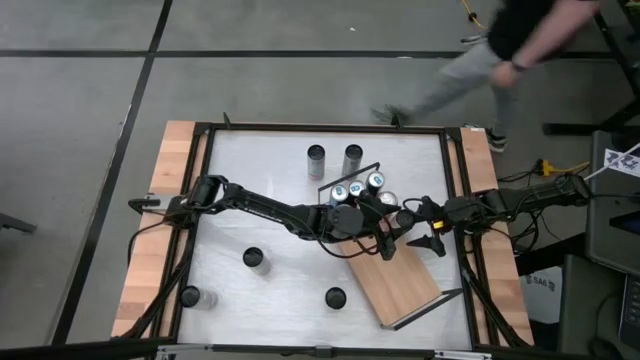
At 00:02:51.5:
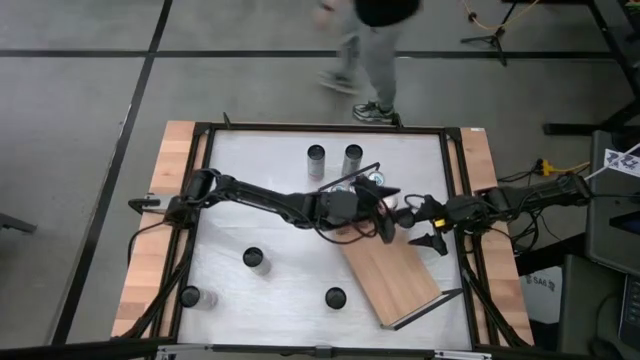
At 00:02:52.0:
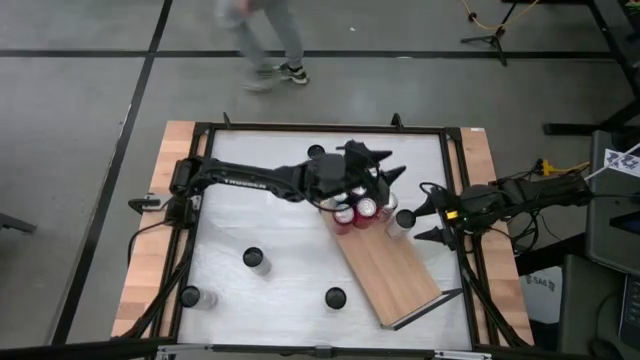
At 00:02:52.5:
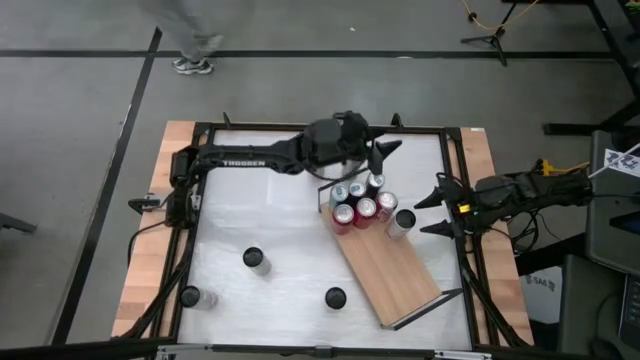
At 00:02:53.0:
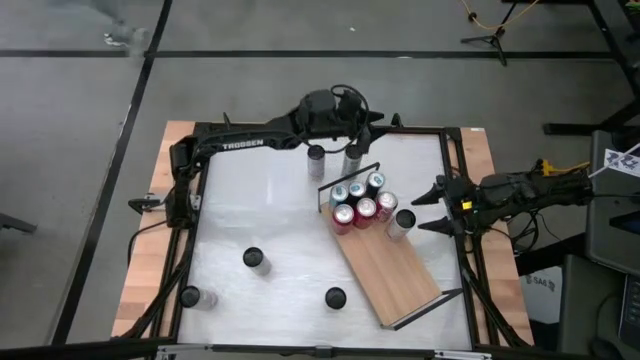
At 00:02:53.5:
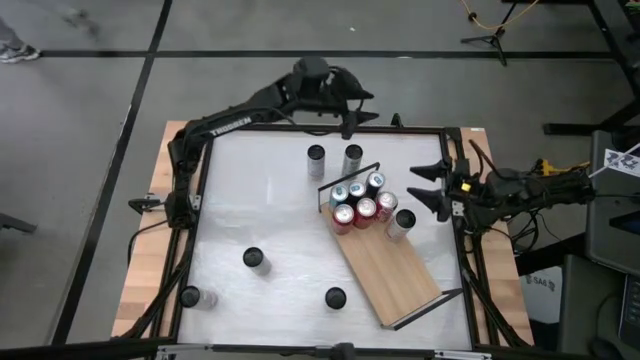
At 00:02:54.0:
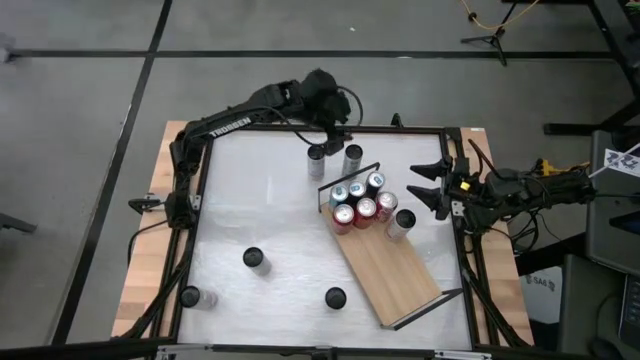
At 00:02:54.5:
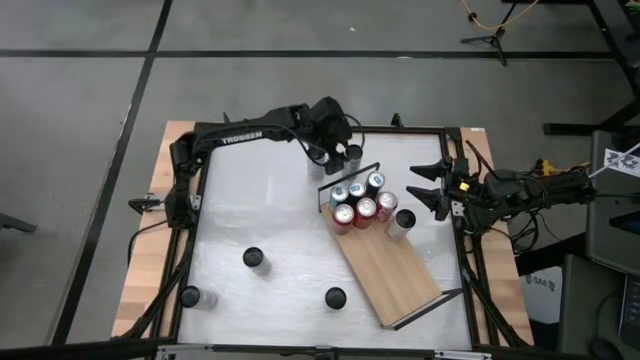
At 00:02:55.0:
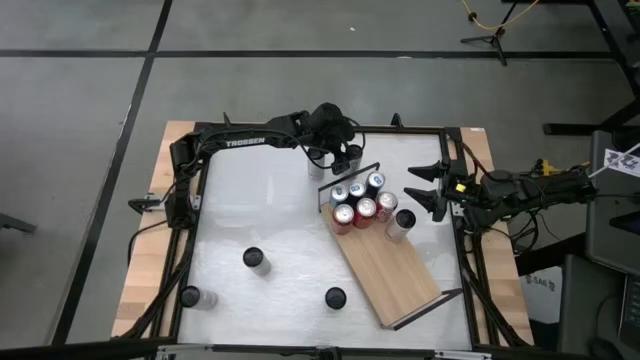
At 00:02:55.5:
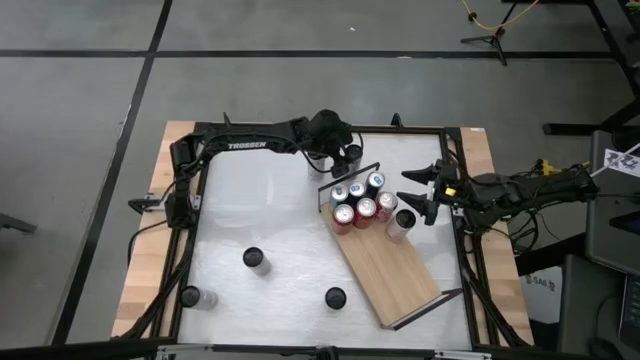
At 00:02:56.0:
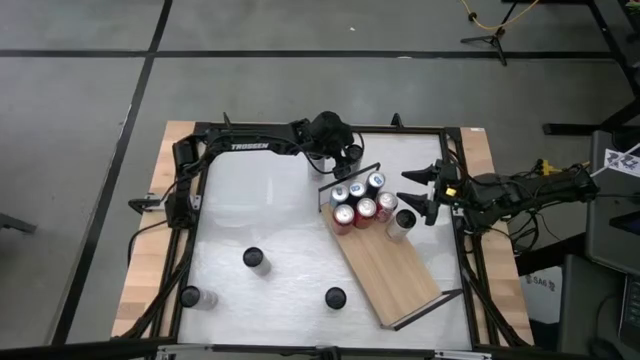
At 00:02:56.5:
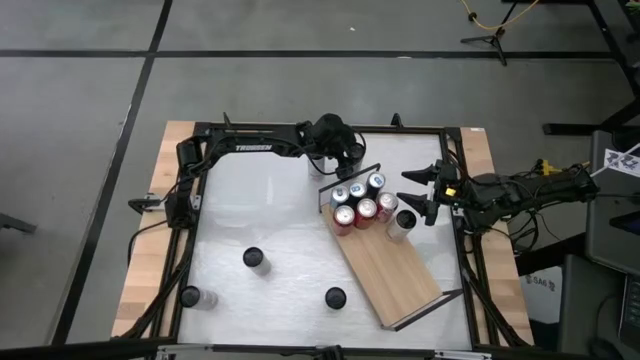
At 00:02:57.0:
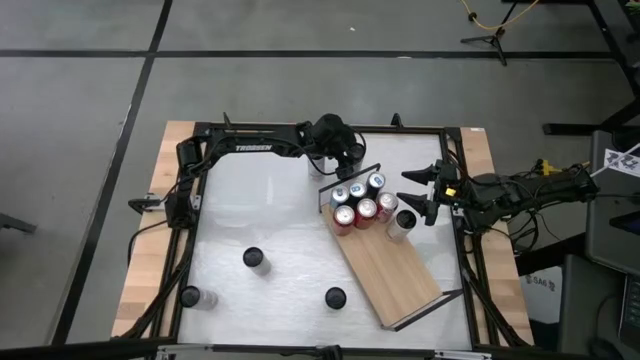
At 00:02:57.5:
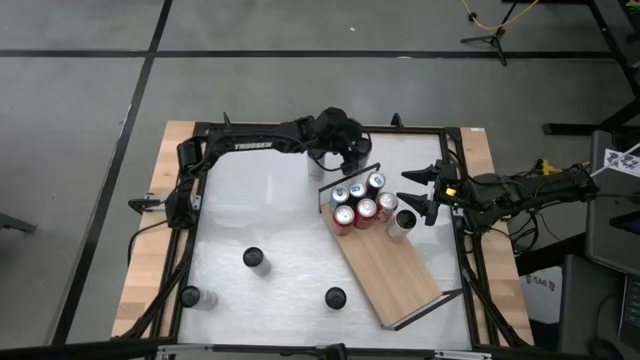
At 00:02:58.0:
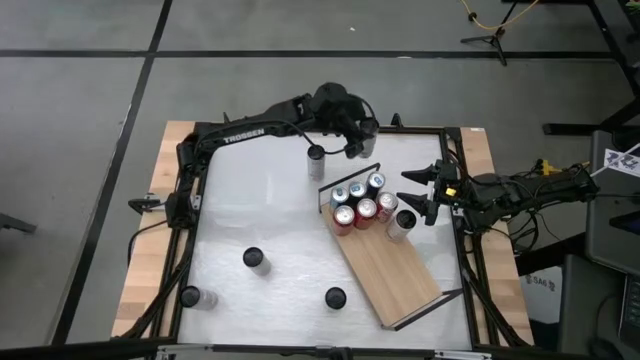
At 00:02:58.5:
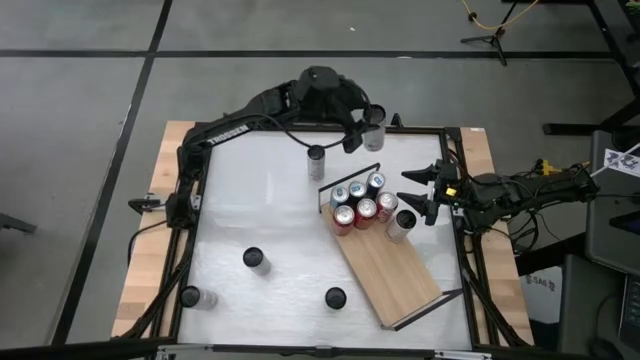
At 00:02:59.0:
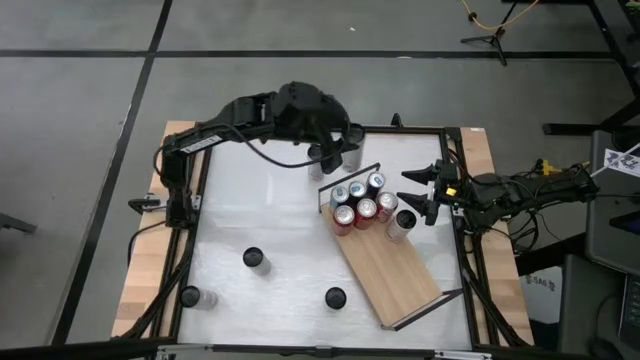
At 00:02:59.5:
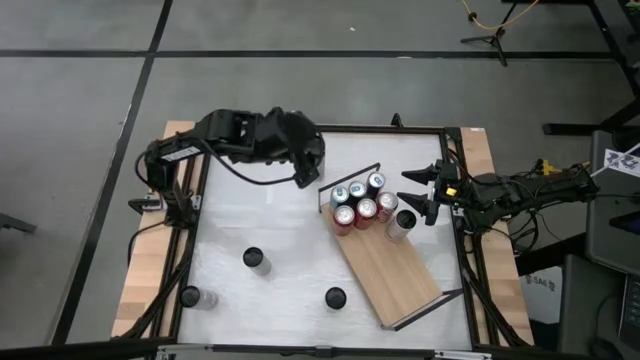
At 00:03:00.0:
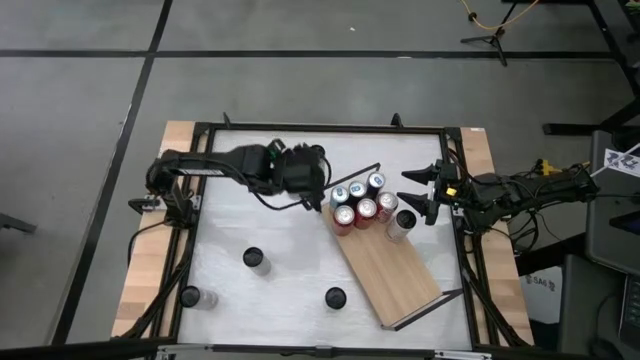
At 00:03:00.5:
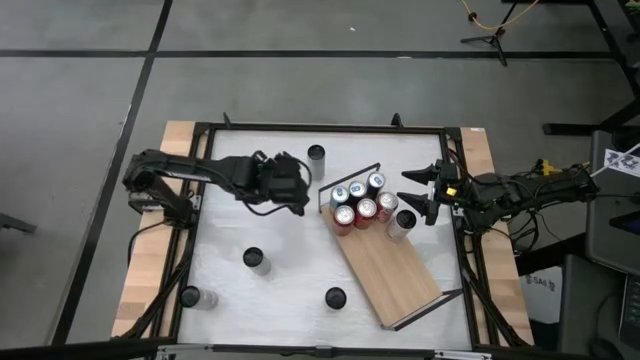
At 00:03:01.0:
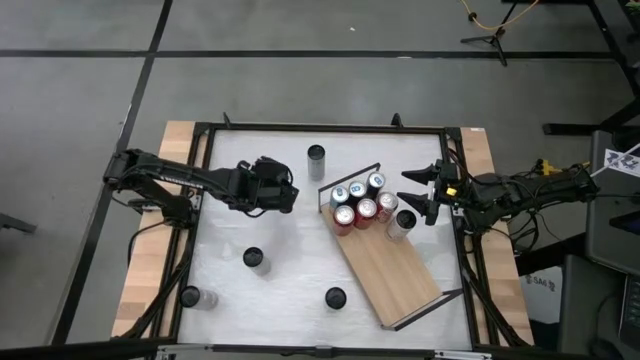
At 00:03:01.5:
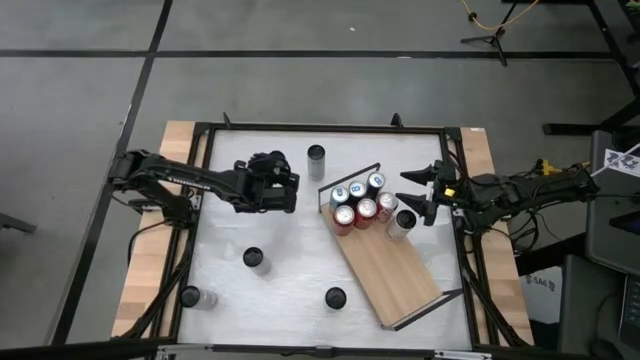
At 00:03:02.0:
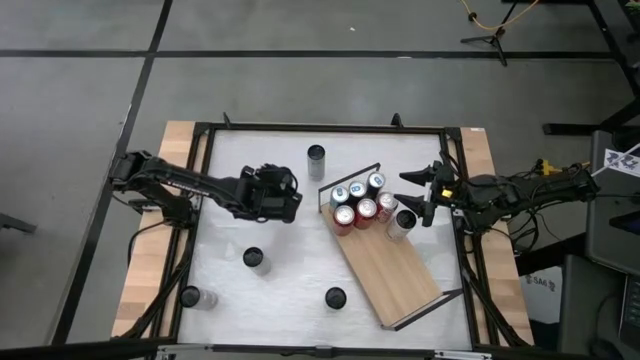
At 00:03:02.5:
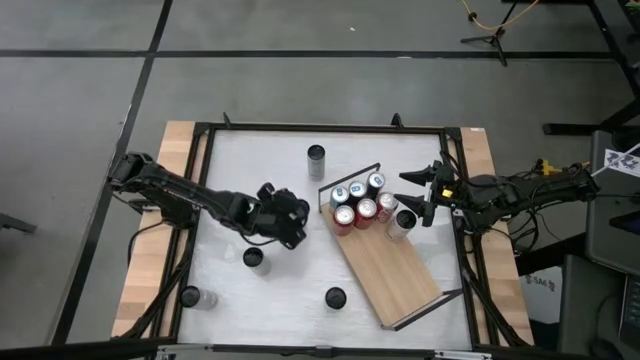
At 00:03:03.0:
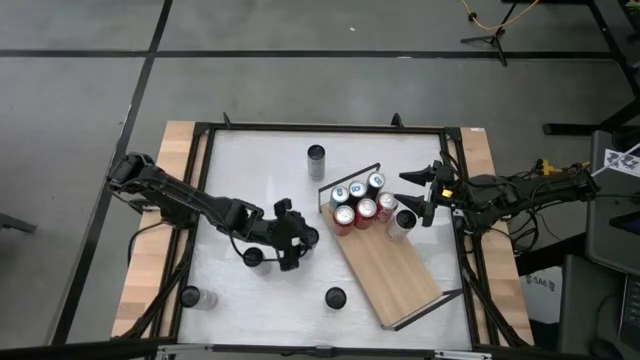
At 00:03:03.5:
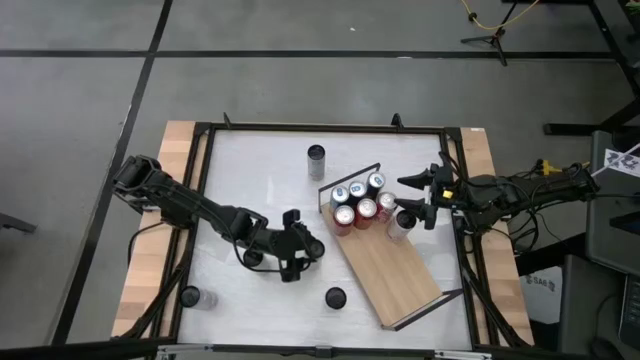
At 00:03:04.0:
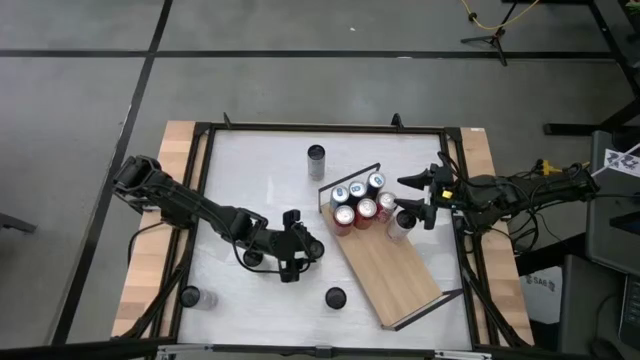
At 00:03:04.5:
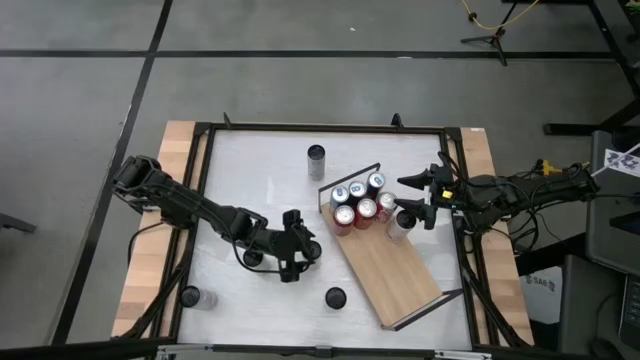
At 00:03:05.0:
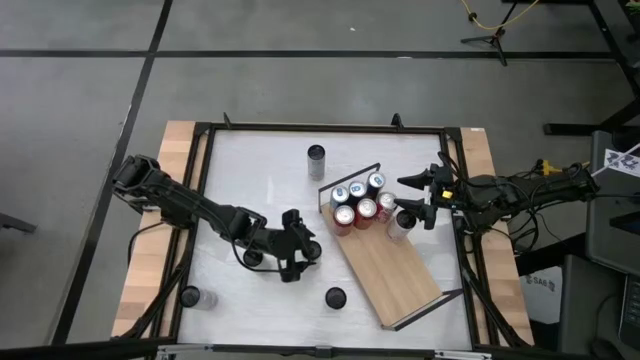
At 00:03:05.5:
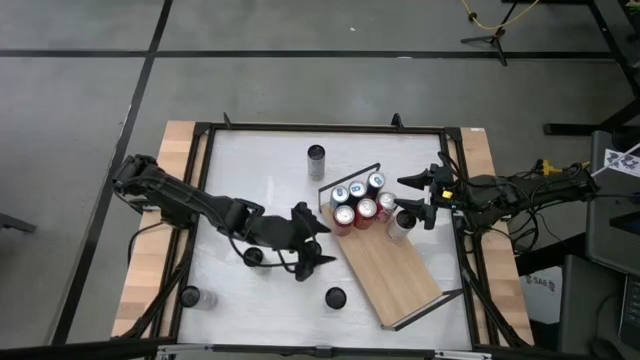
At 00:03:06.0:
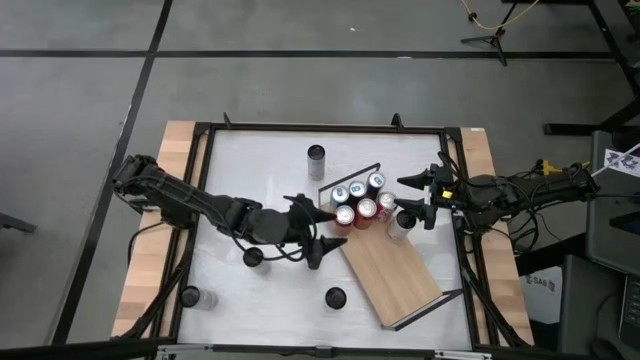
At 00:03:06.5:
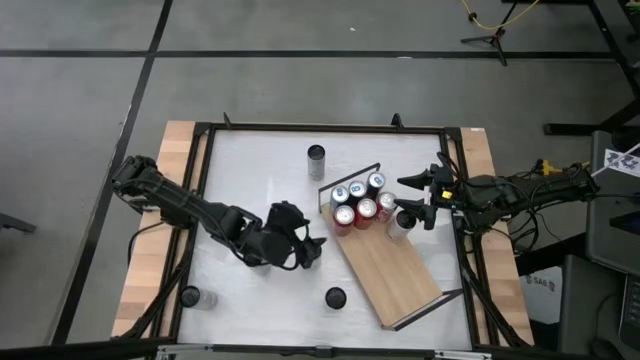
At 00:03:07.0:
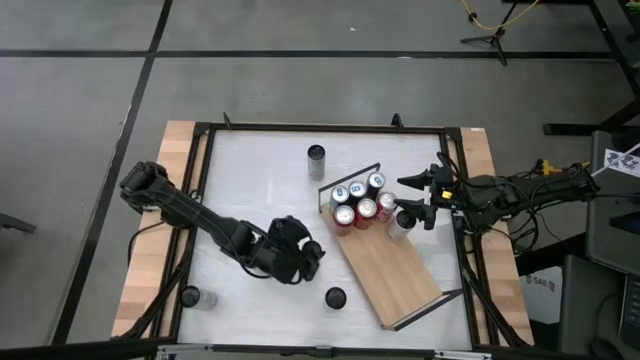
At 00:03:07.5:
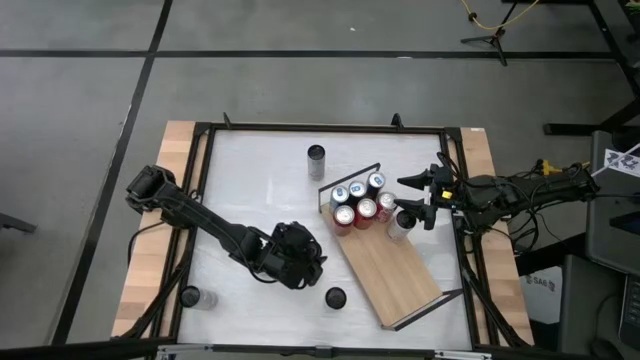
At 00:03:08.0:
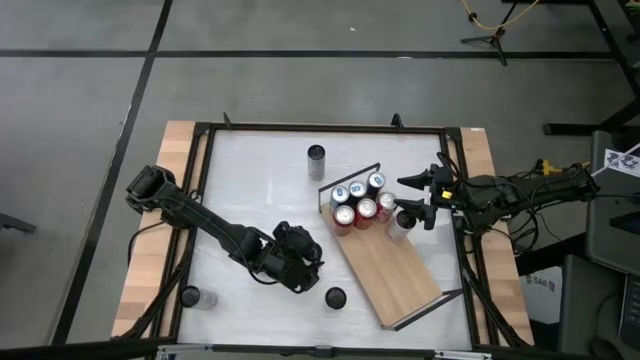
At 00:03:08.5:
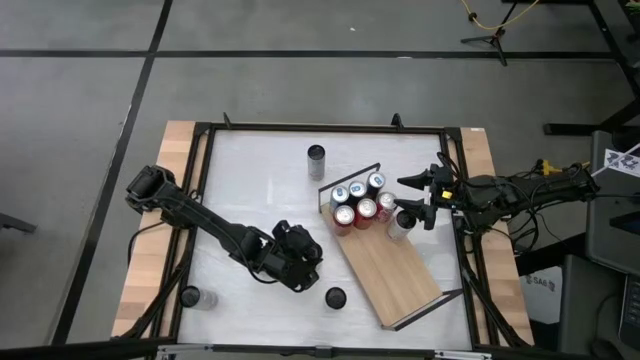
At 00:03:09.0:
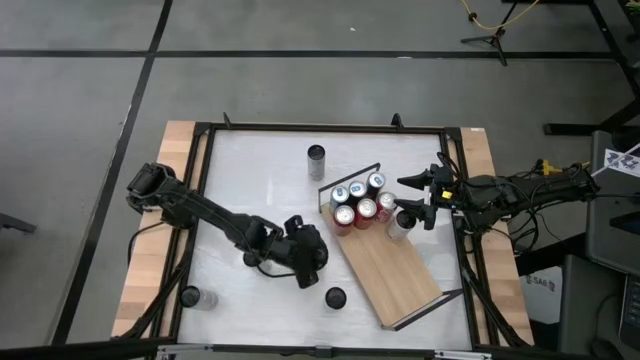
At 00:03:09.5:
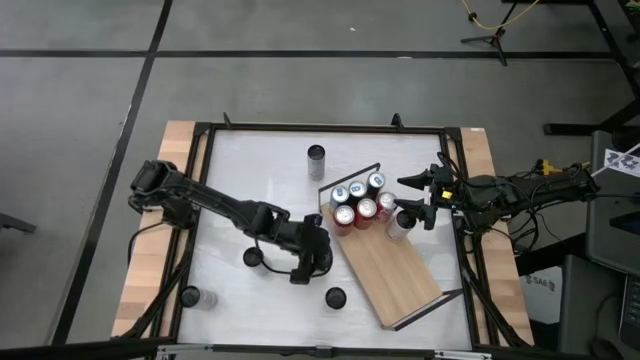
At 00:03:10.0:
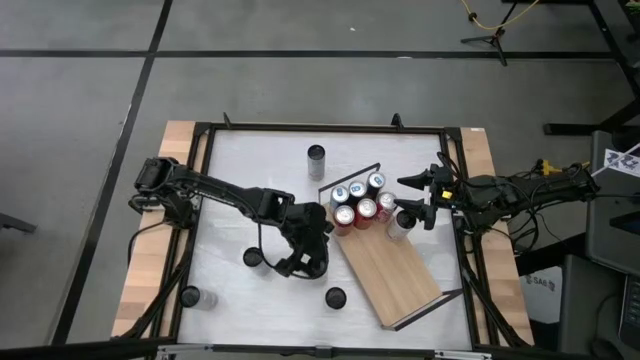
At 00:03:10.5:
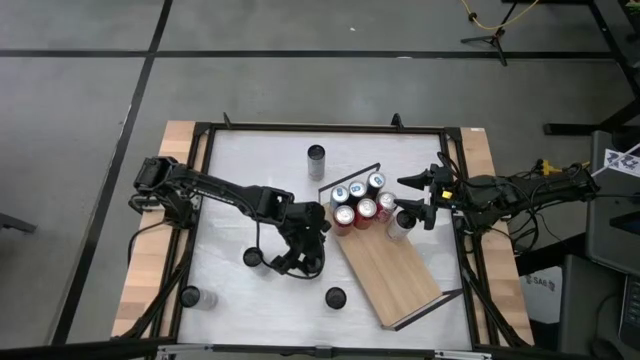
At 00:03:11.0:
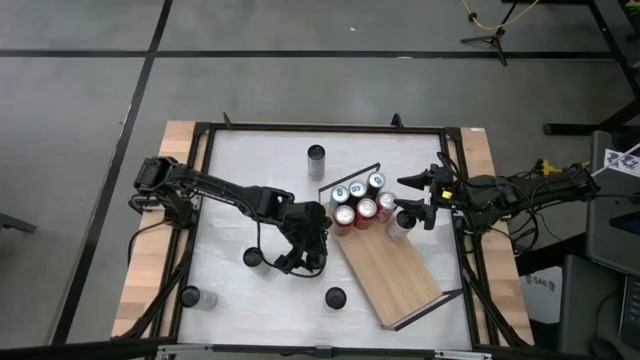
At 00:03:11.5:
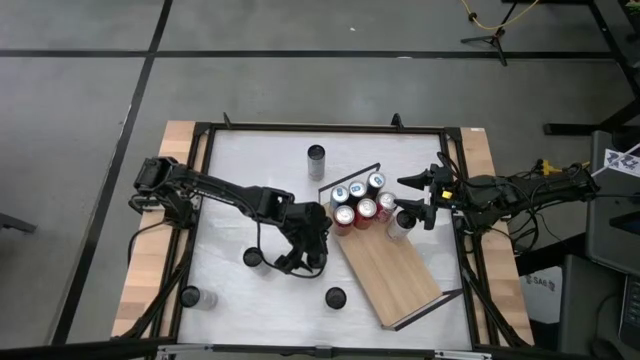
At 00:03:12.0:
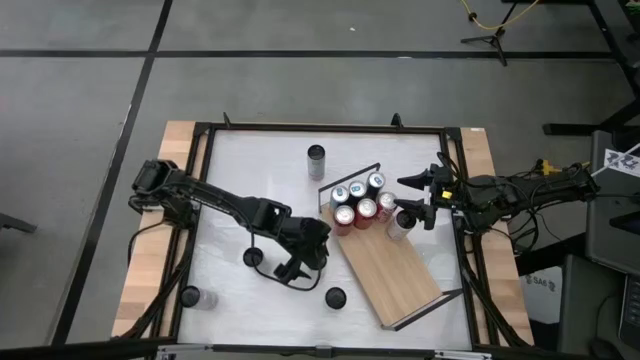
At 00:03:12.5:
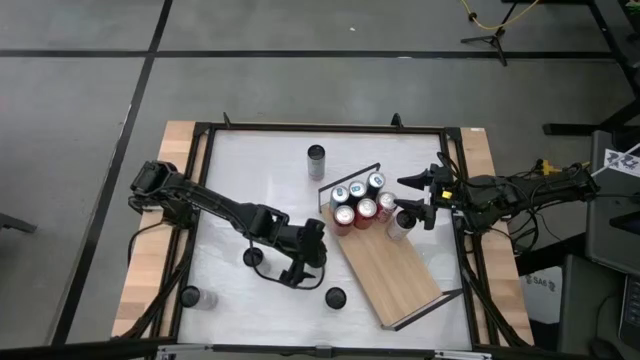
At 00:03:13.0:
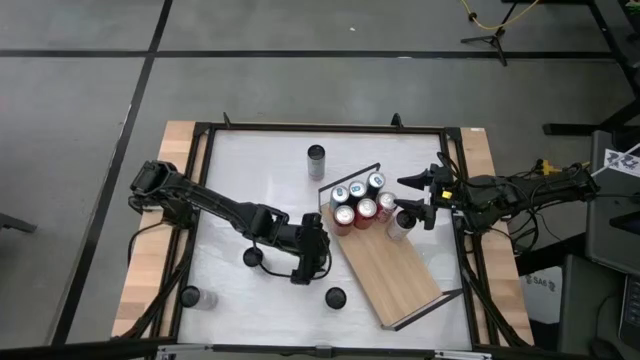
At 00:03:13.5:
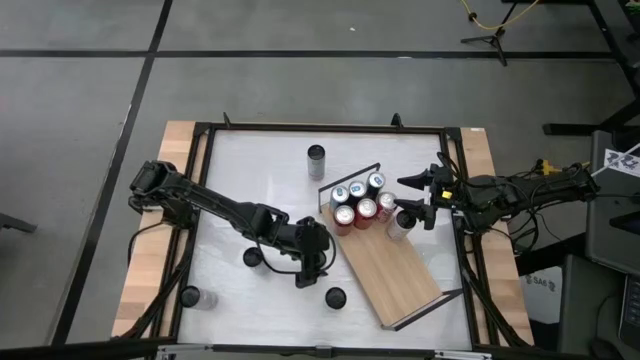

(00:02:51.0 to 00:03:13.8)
Task: Place canned beverage on shelf
Put the white pink soda can on the shelf aligned with the other white pink soda can
